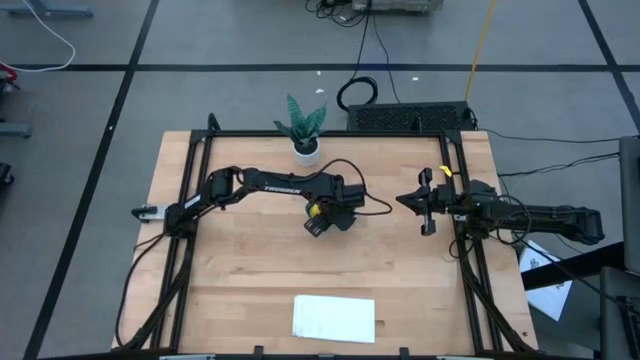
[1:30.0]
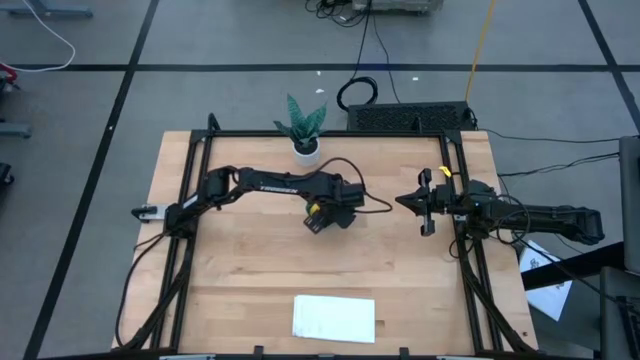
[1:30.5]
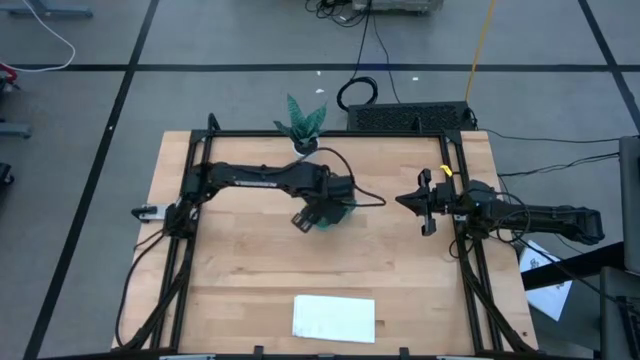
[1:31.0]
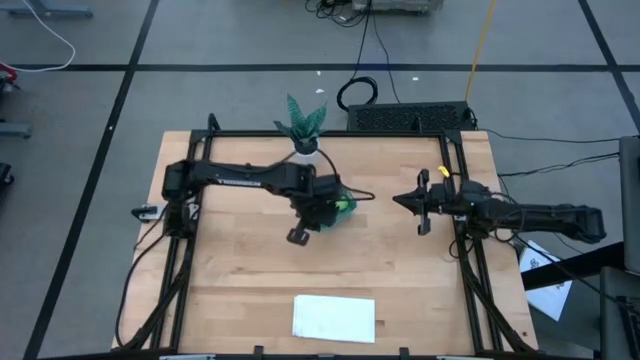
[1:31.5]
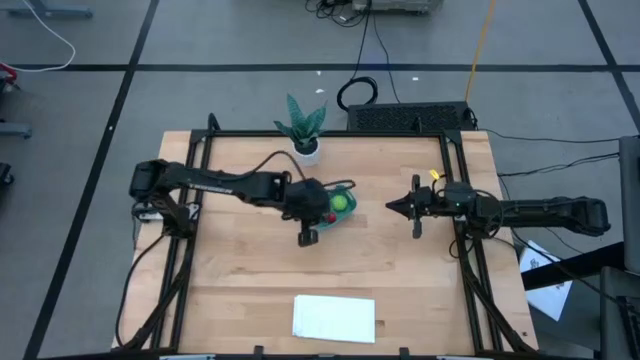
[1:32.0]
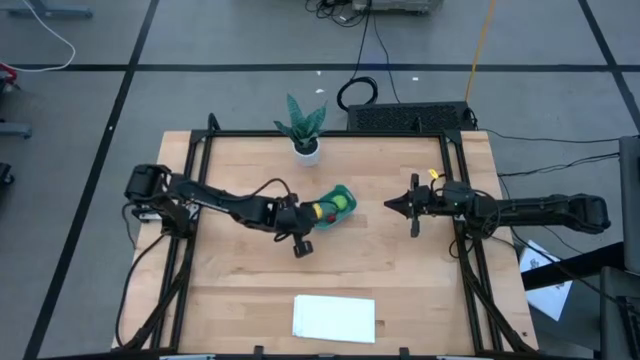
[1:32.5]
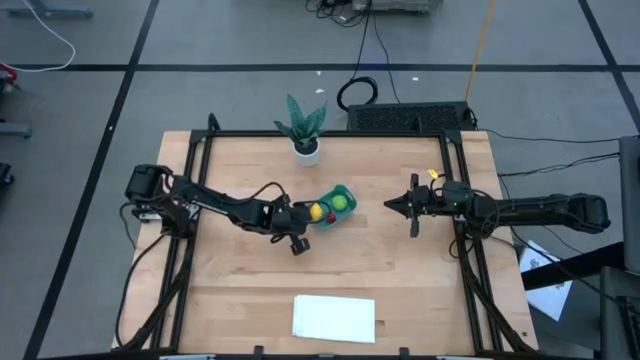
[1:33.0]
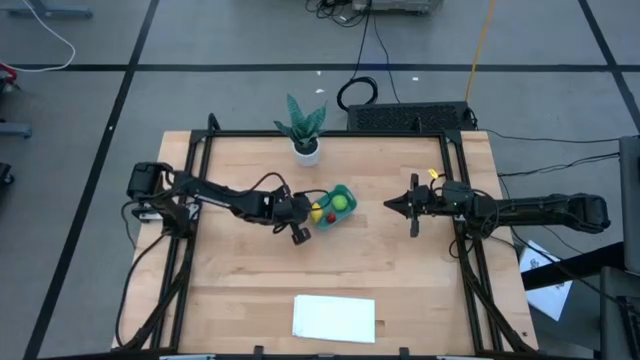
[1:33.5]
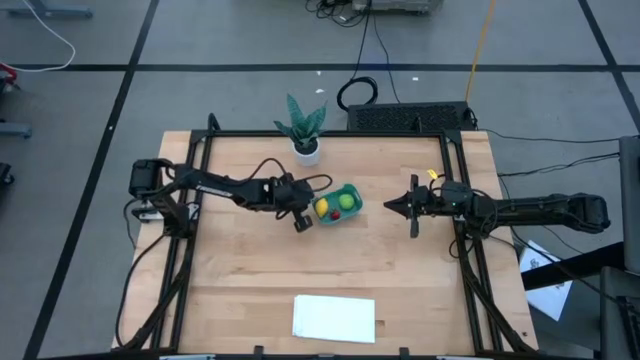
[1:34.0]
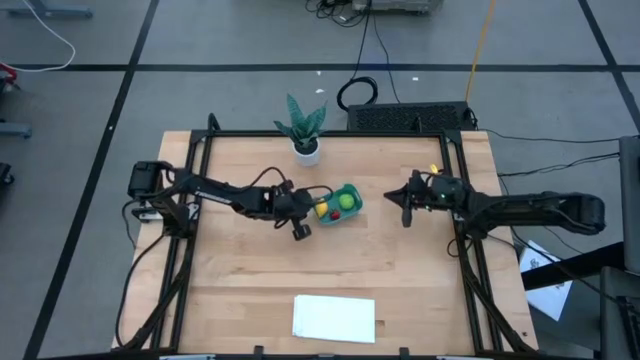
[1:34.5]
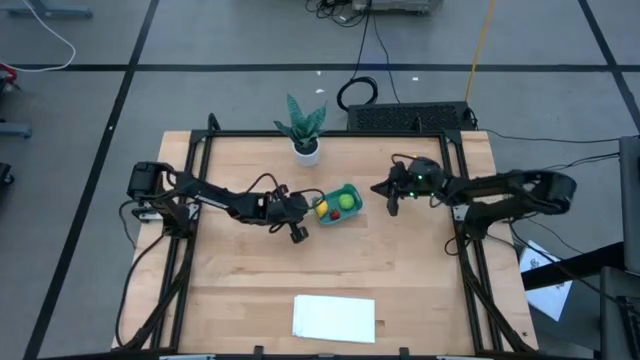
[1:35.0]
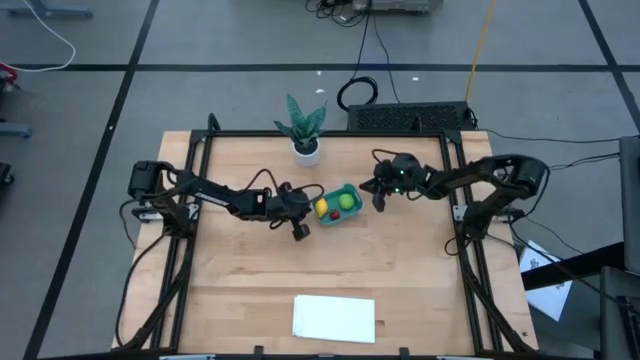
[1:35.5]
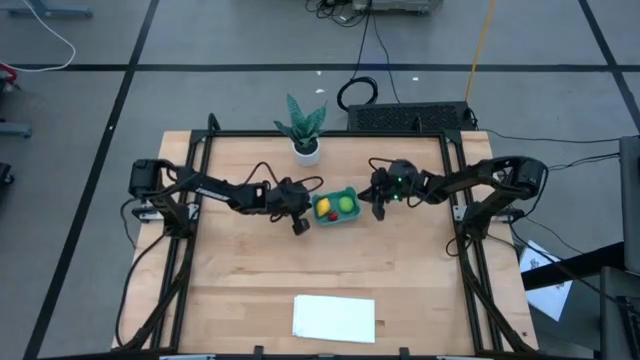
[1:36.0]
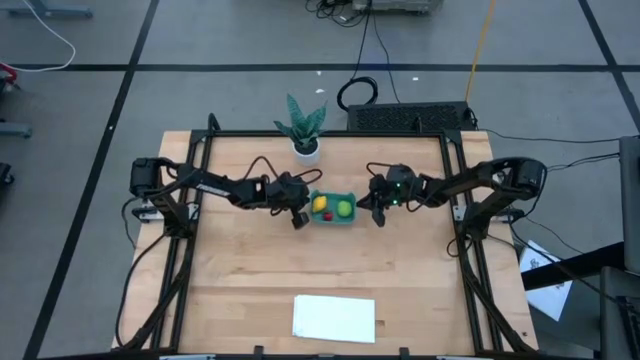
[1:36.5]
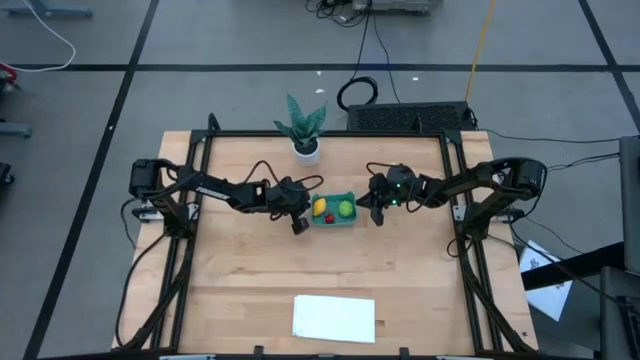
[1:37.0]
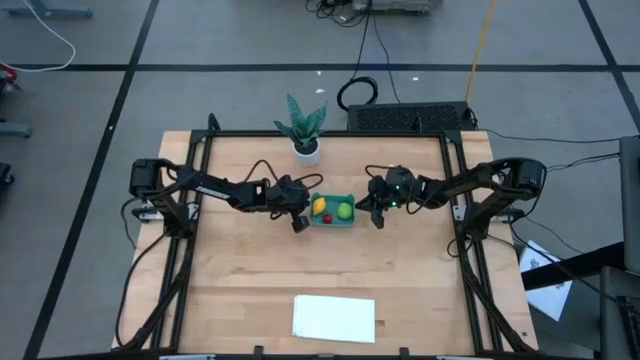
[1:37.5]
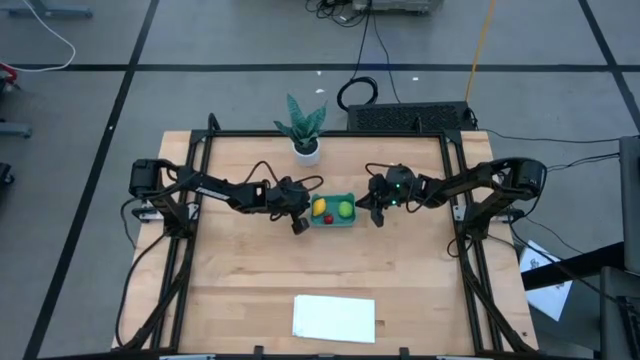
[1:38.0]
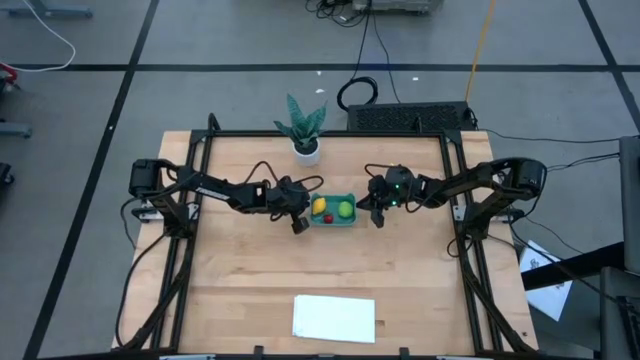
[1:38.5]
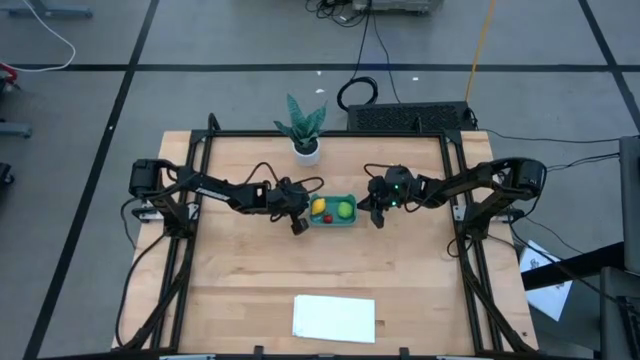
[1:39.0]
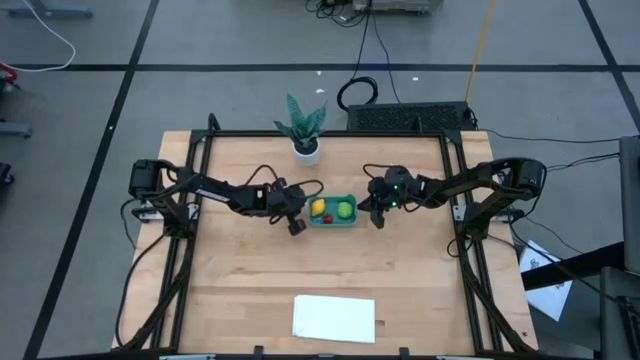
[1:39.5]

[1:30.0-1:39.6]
Task: Pick and placing Produce into tupperware
Adjust the green bin

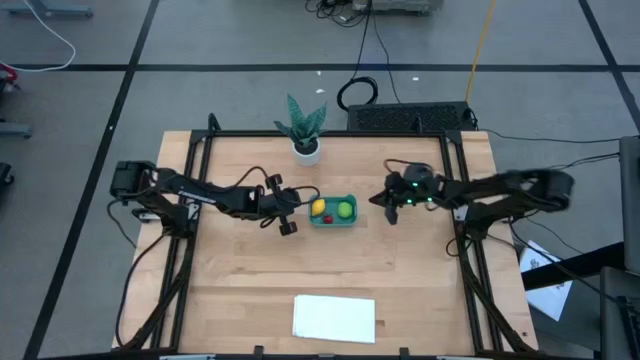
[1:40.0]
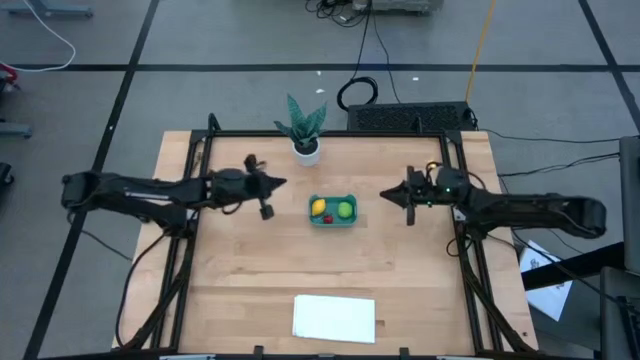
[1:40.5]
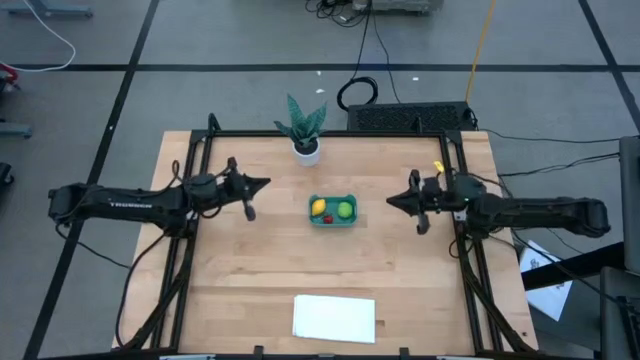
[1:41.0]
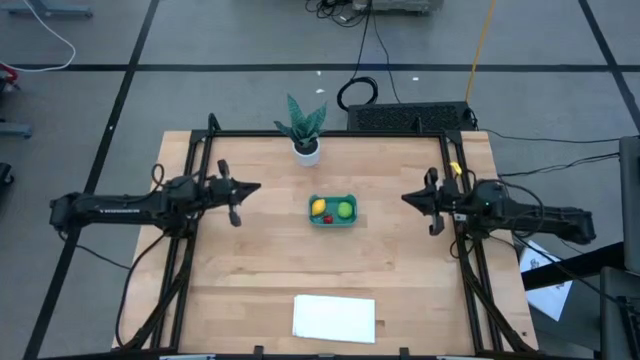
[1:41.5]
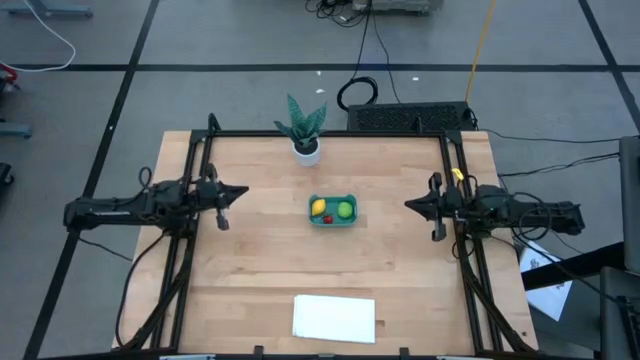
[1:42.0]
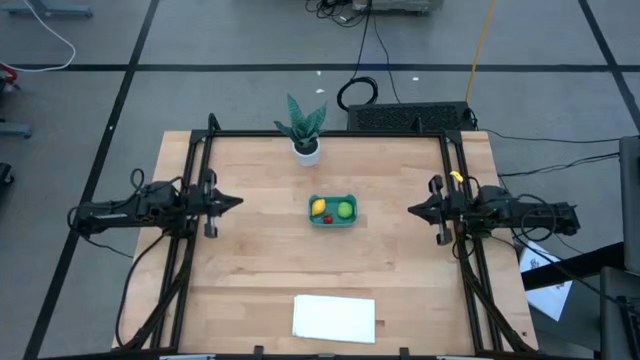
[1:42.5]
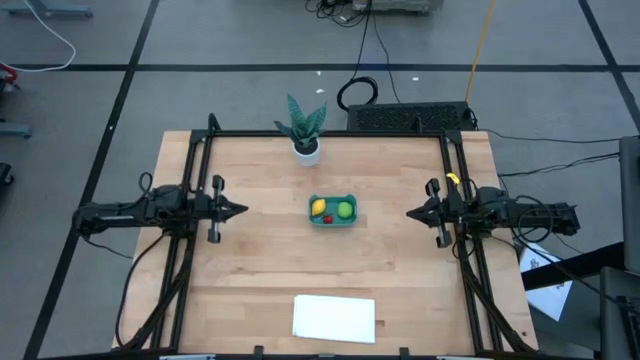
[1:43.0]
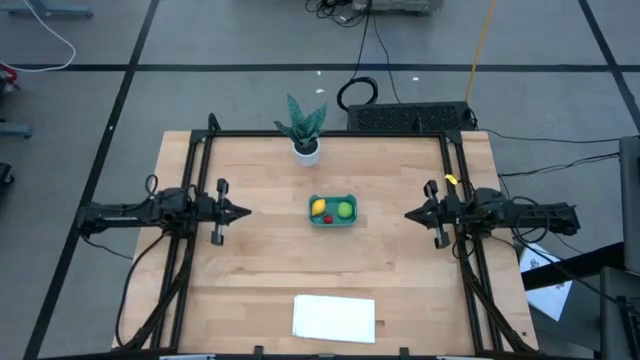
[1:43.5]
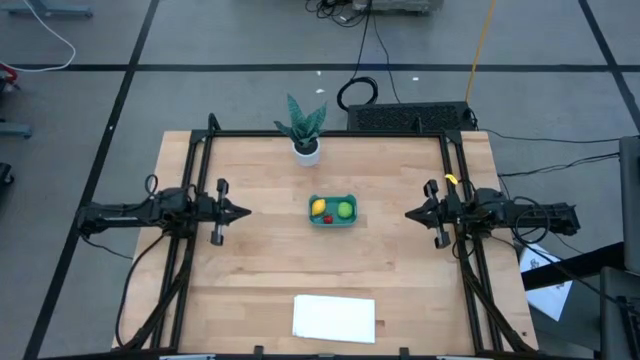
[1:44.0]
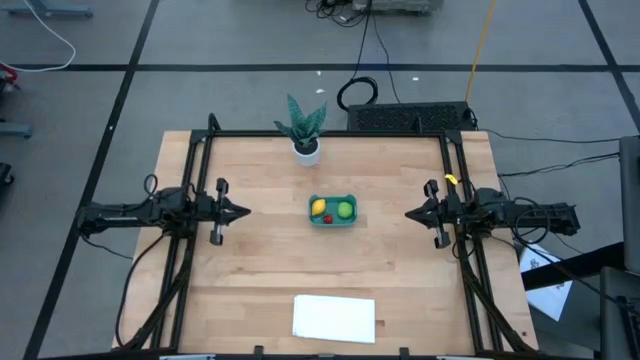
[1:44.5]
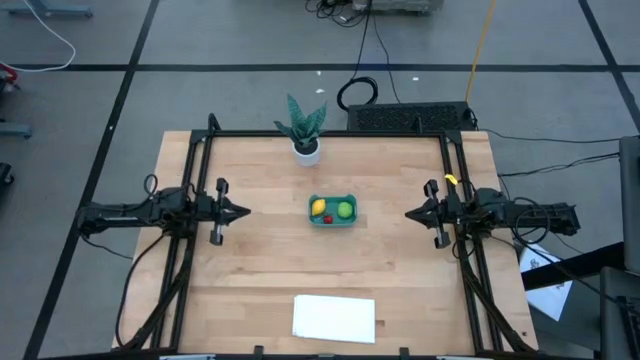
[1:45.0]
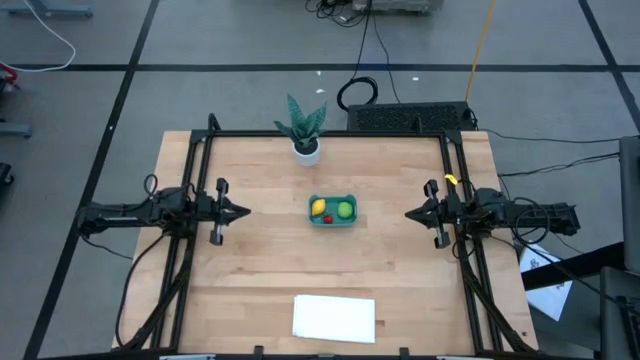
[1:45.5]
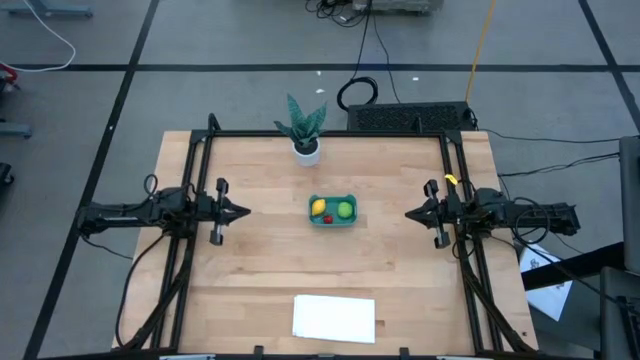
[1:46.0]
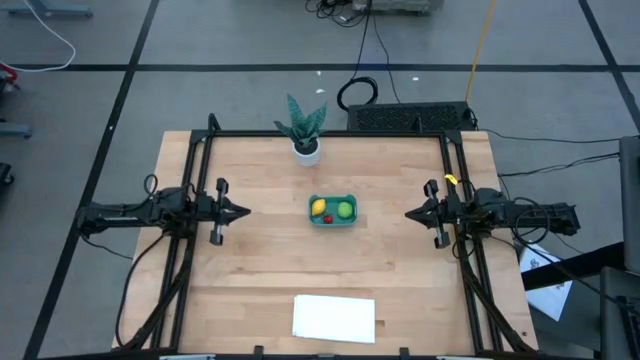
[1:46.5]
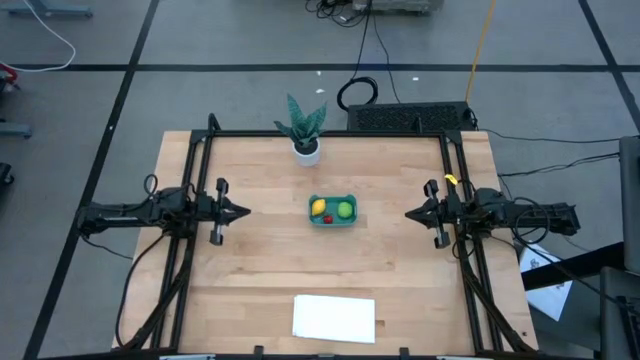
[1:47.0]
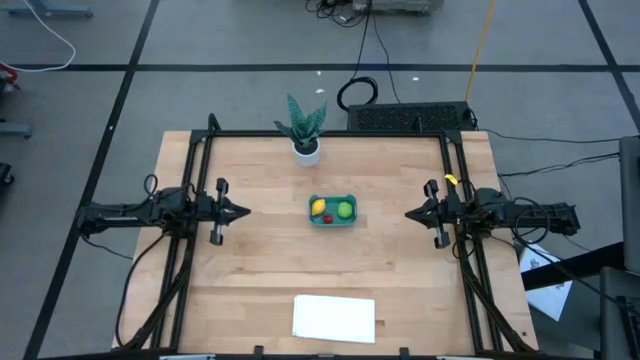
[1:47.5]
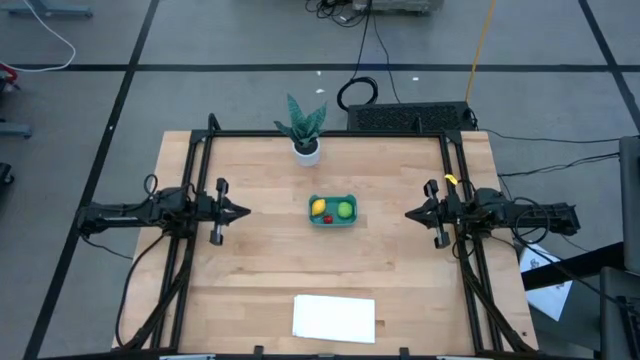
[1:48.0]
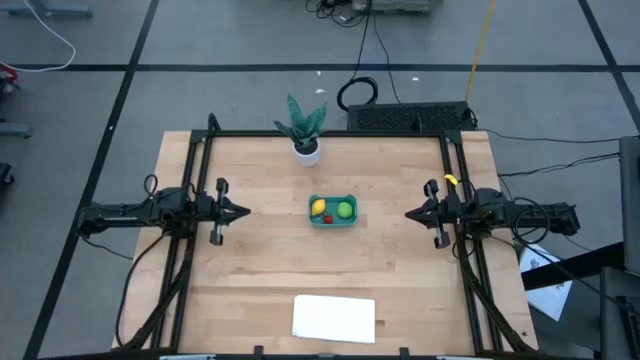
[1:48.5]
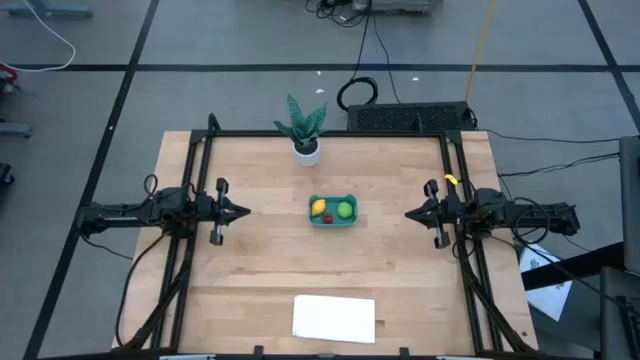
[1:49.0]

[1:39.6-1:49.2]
Return to Home Position

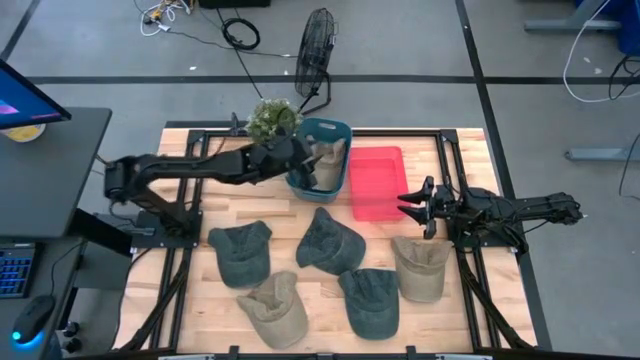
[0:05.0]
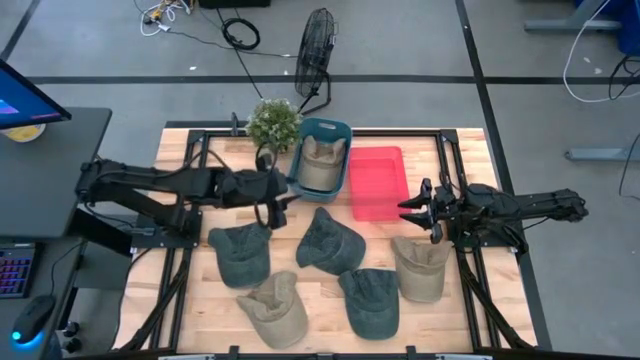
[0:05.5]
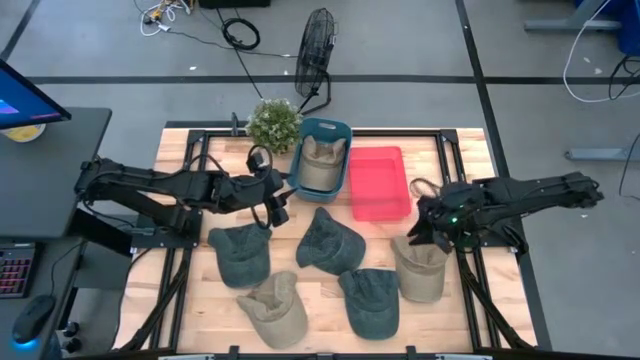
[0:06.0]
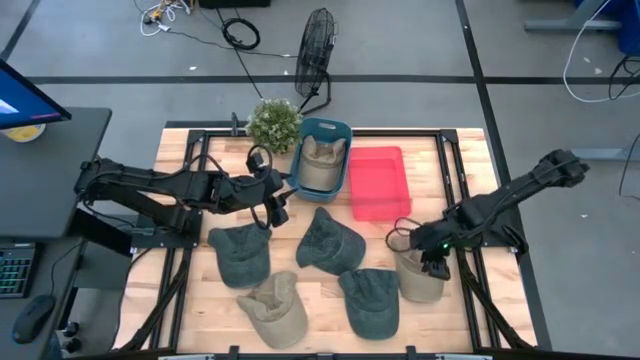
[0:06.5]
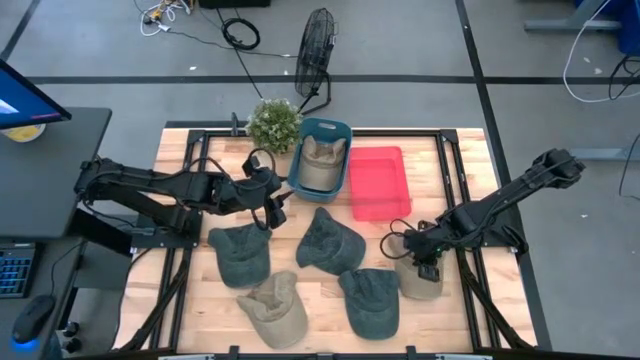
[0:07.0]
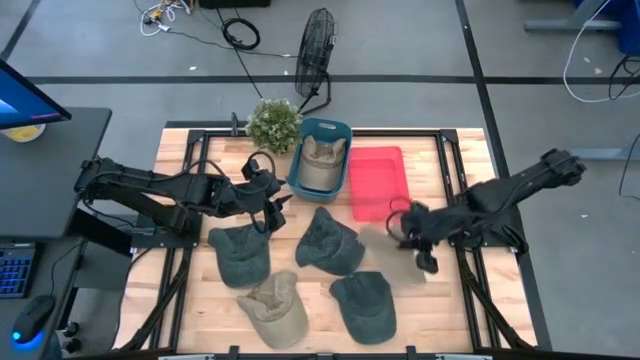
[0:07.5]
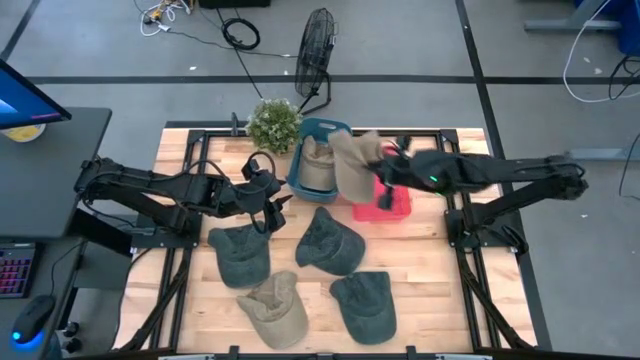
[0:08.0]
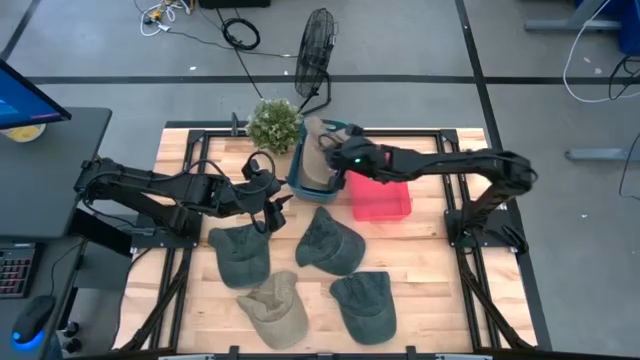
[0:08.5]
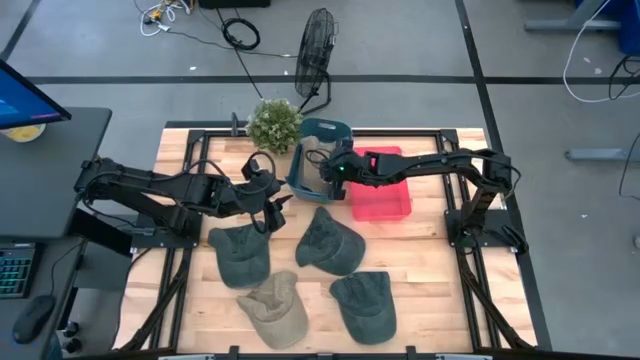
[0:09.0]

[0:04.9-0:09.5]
Task: Pick & Place hat
Put the top brown cap into the blue bin
